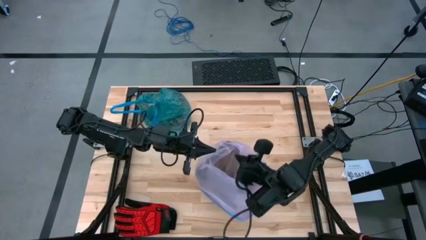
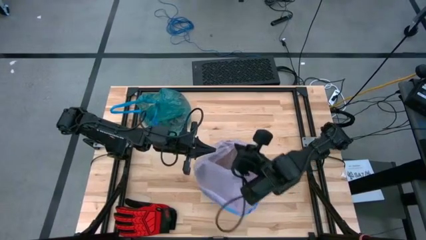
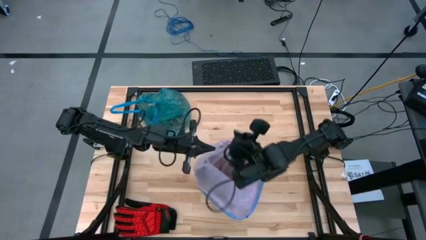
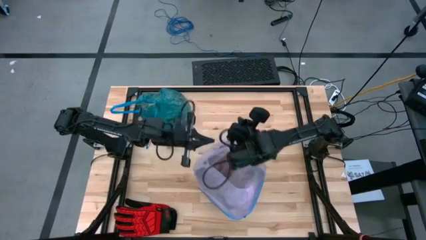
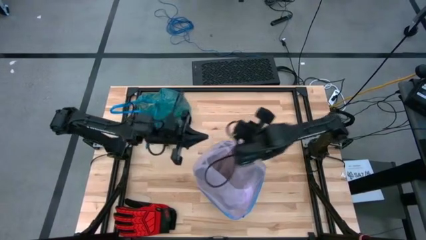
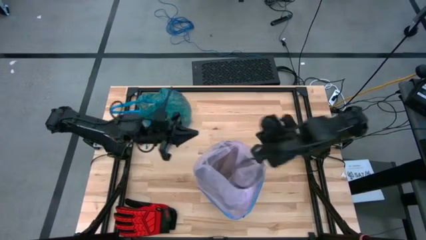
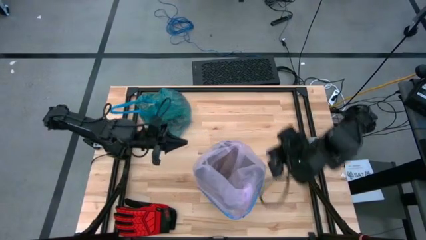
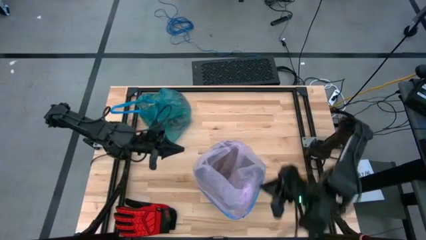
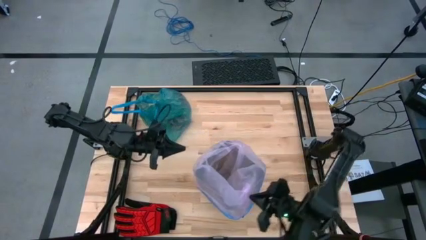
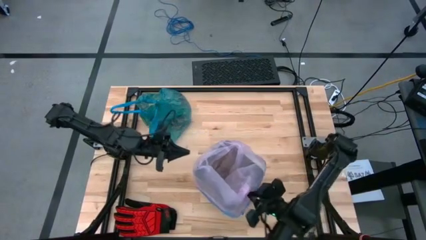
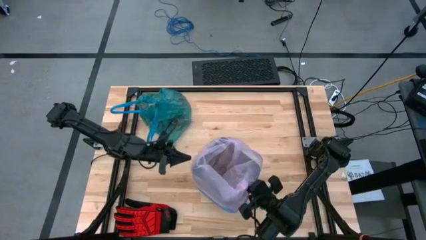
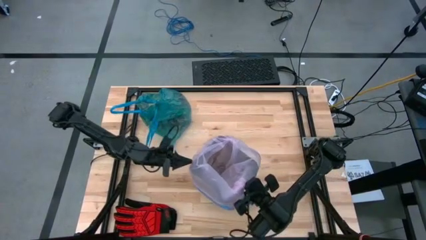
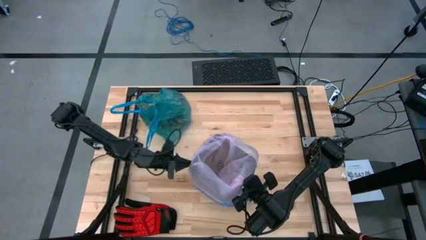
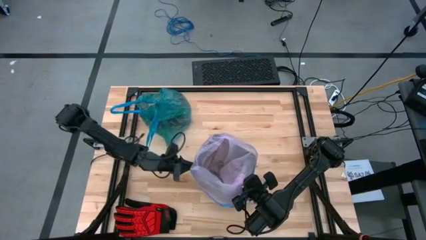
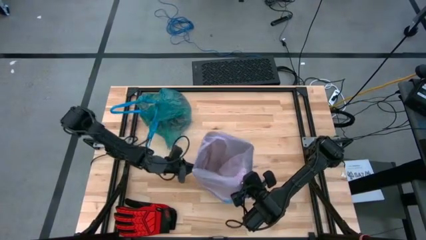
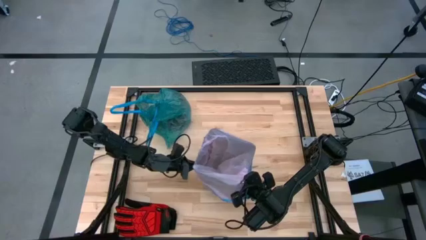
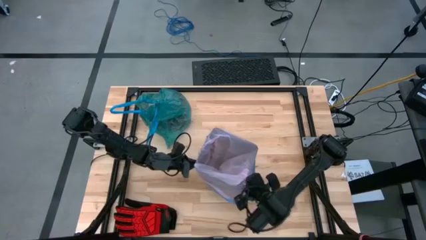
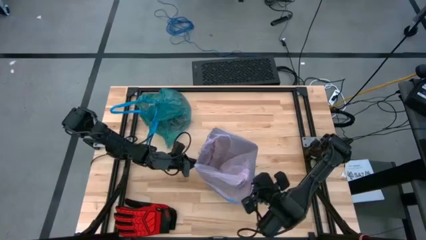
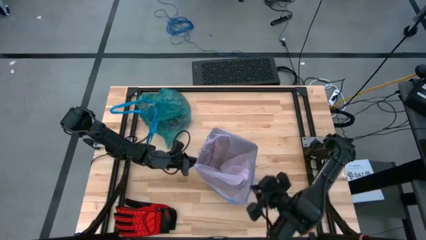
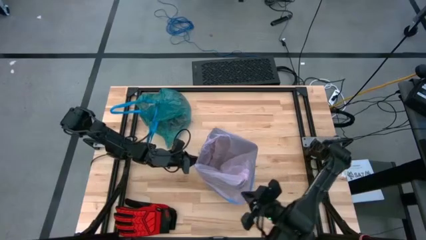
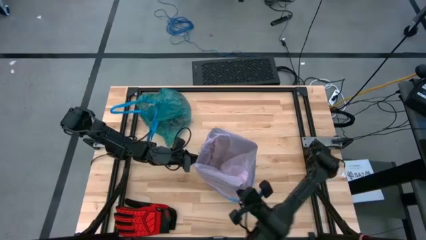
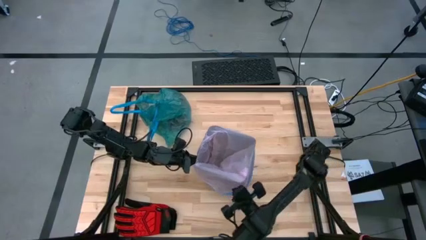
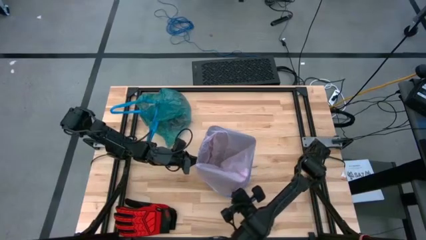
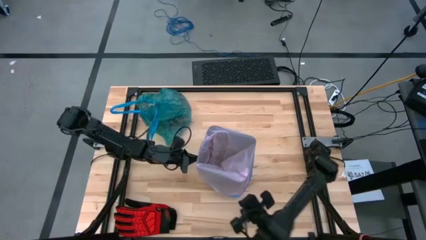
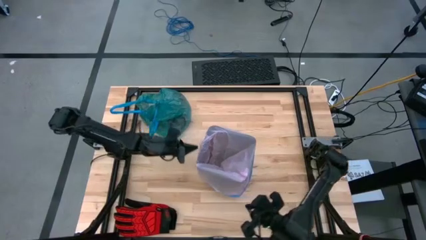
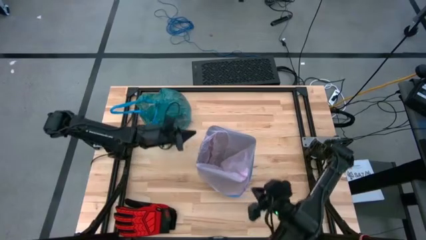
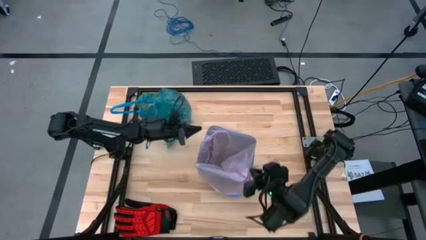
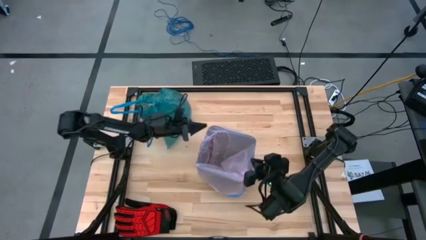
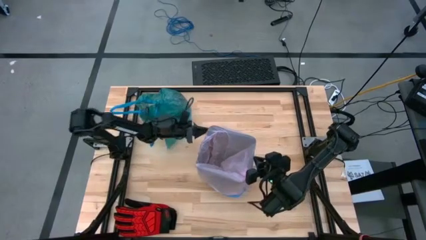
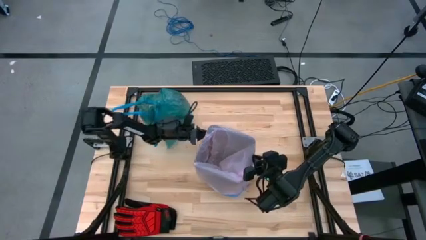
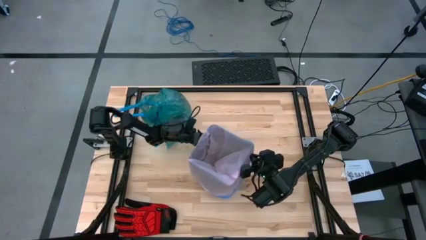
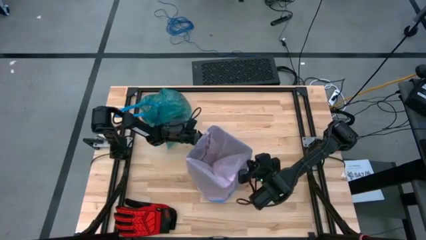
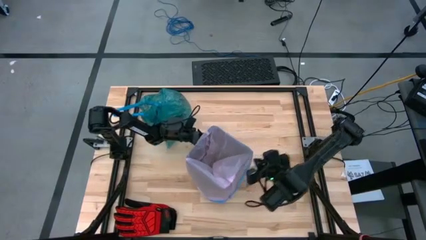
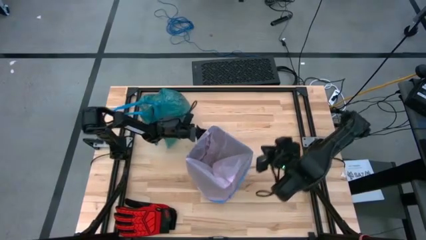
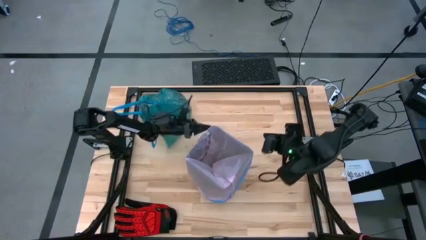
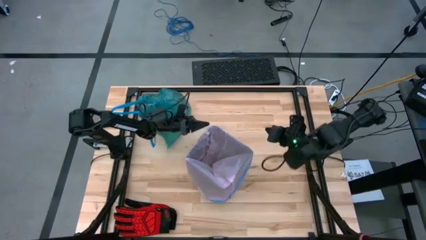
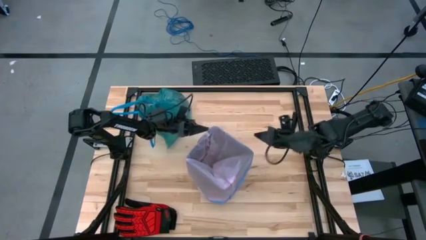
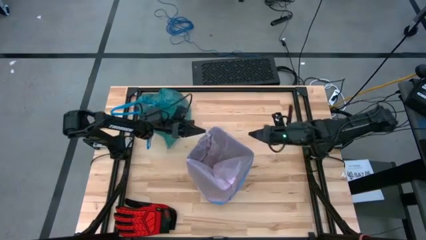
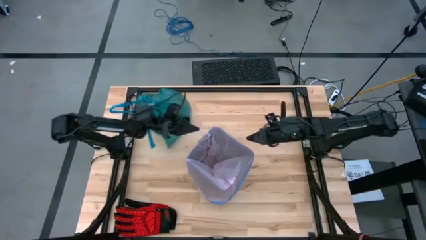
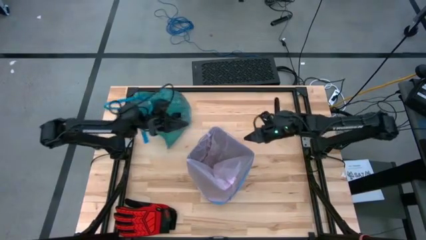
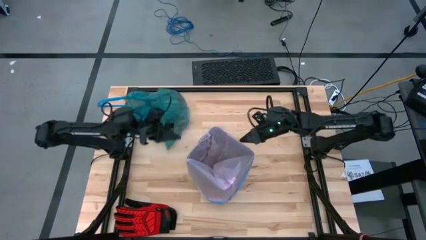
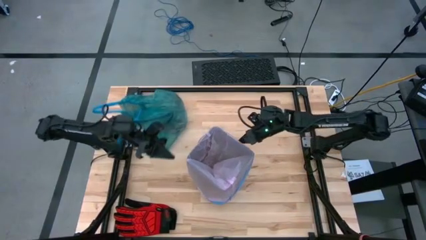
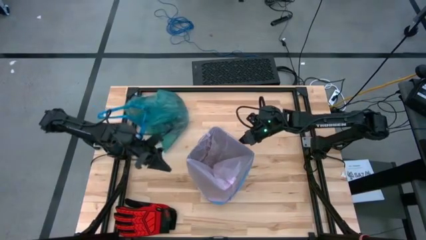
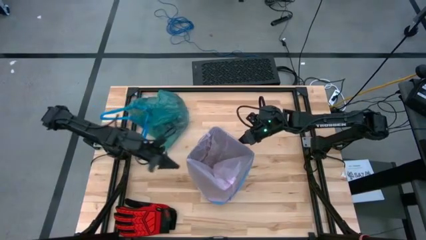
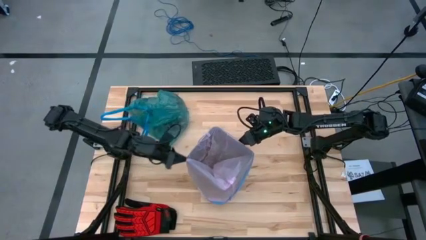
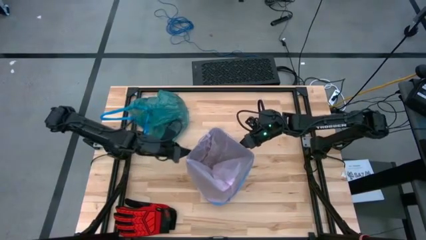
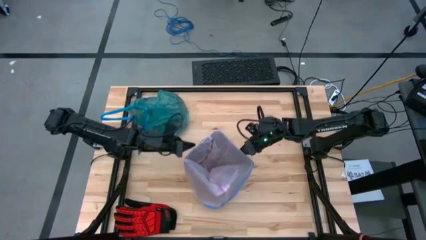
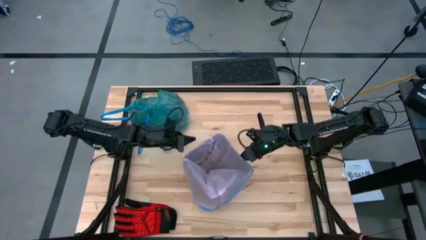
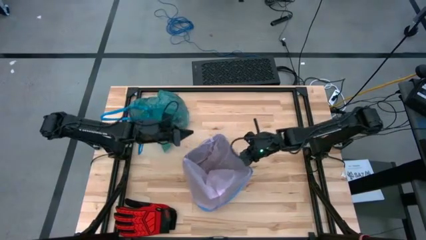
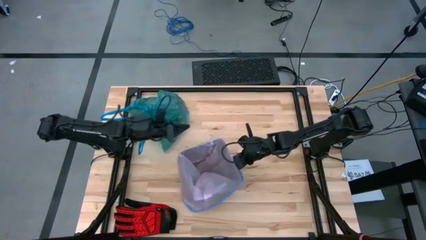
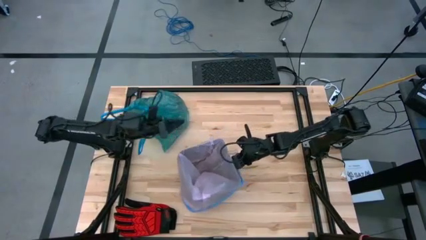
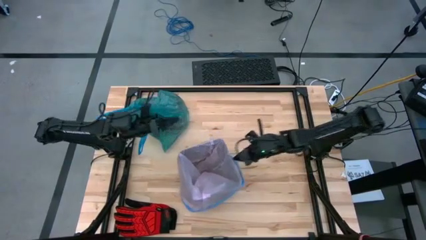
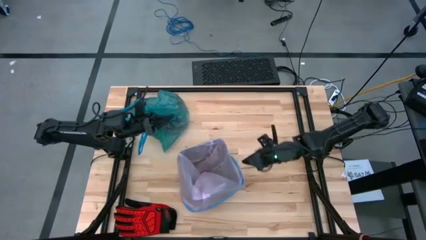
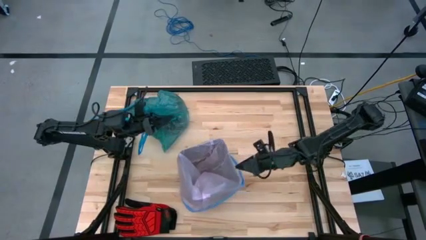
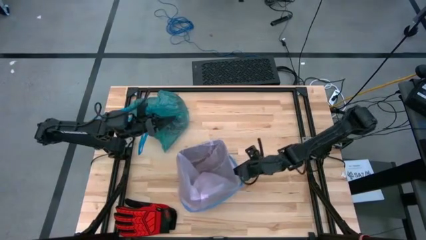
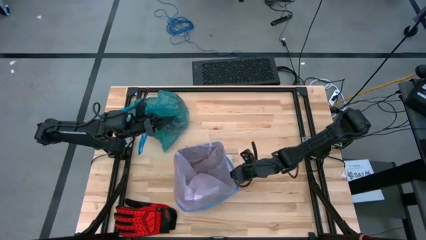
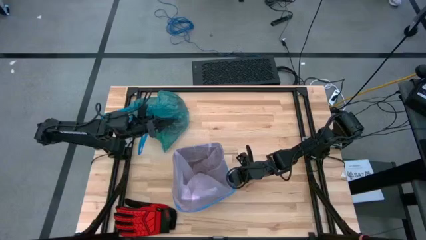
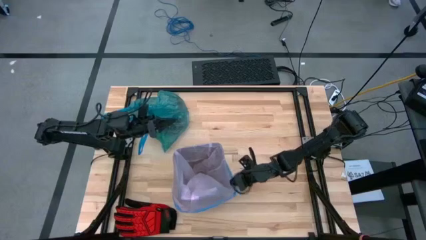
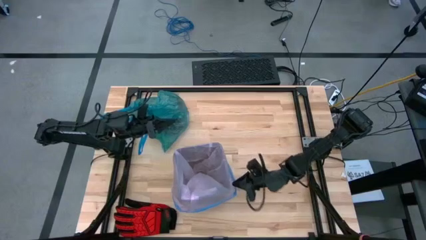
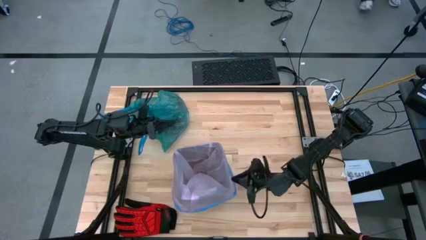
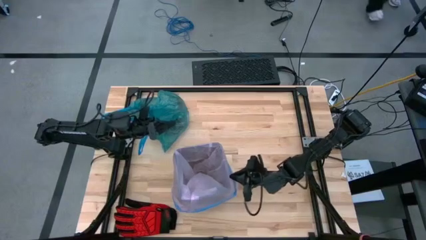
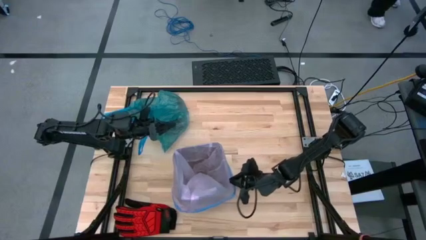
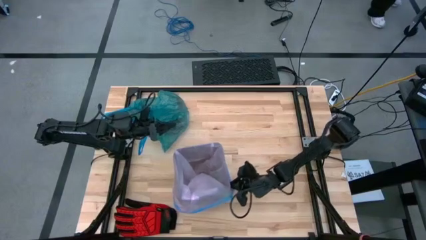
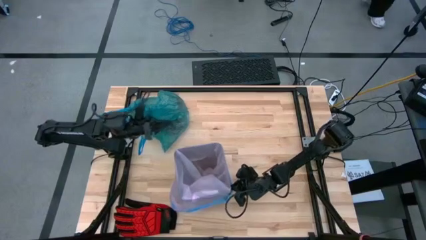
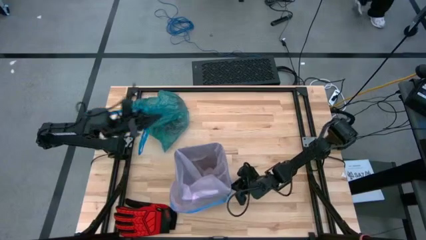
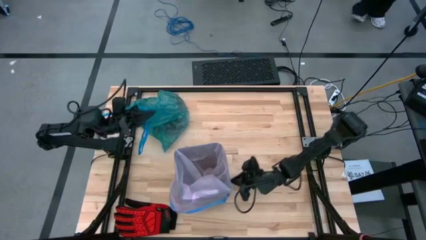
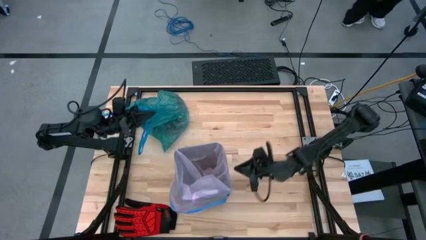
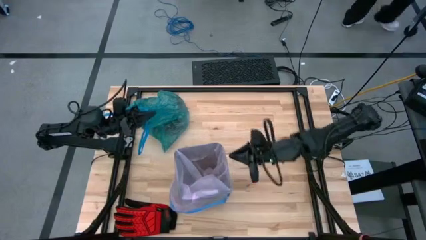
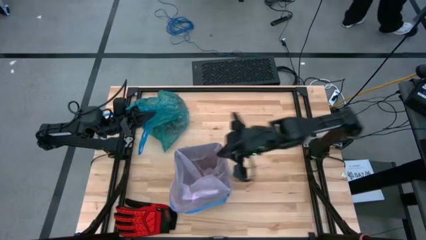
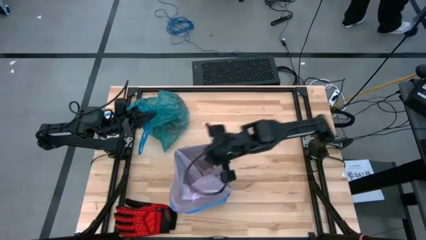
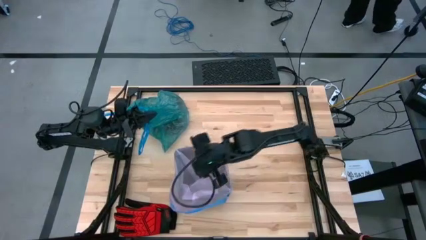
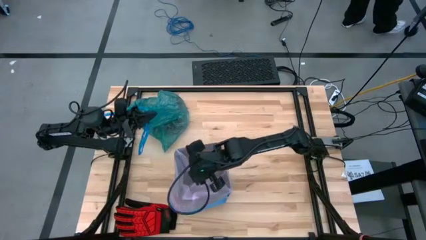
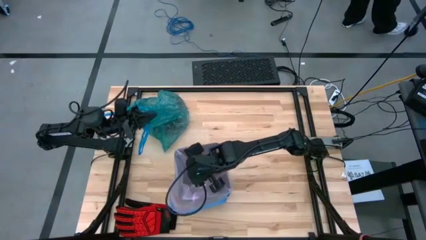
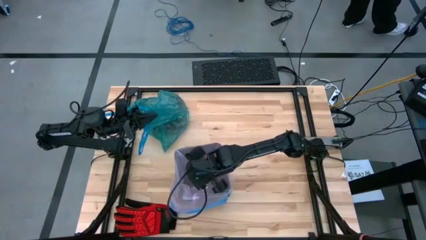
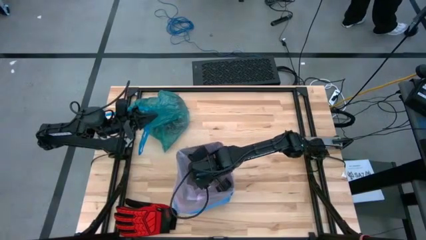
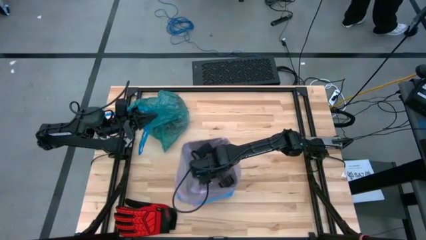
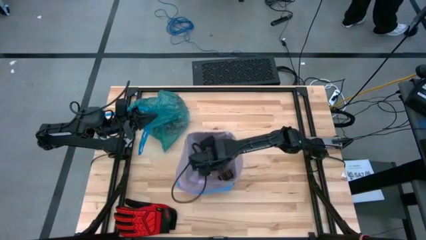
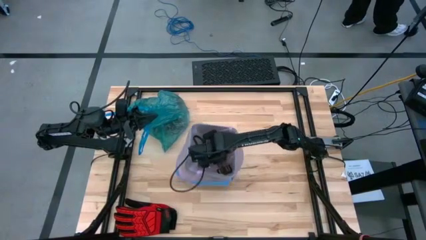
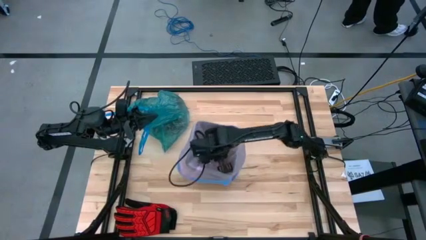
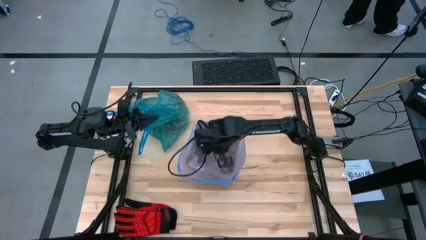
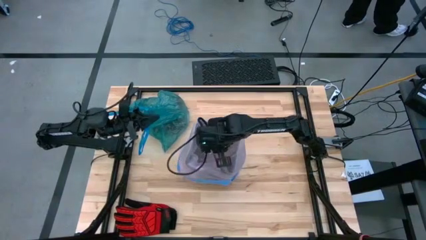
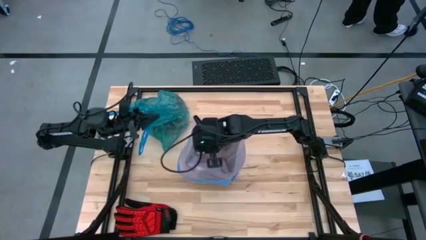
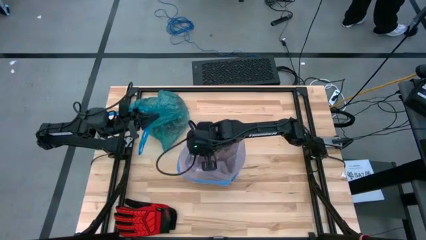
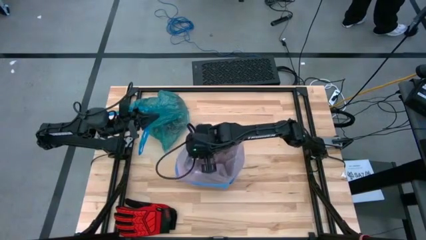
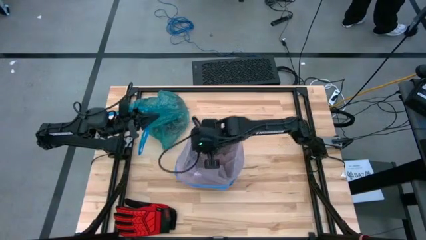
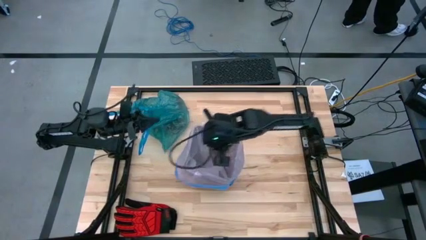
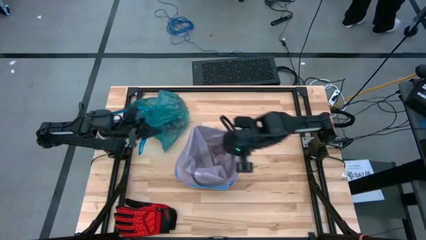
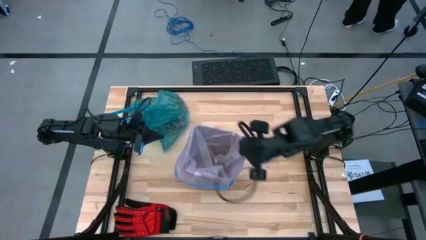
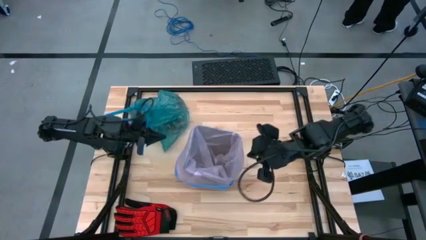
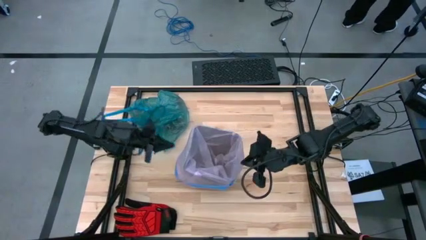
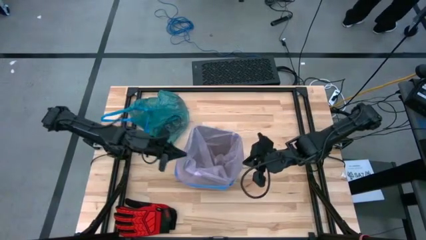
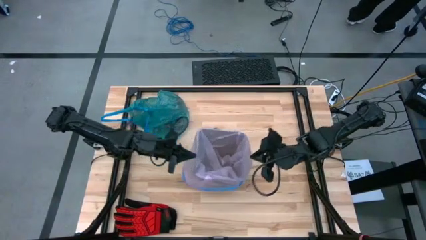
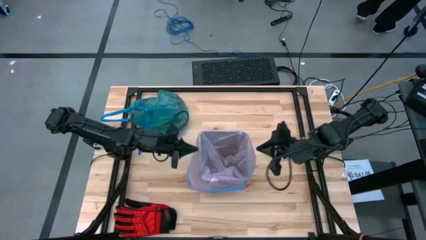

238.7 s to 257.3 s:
Task: place trash/remove bag and relplace
Insert the trash bag into the trash bin
